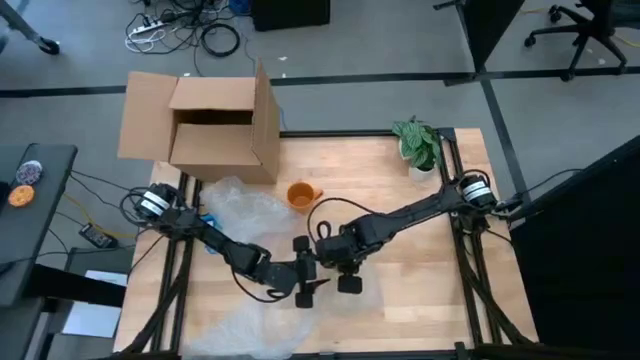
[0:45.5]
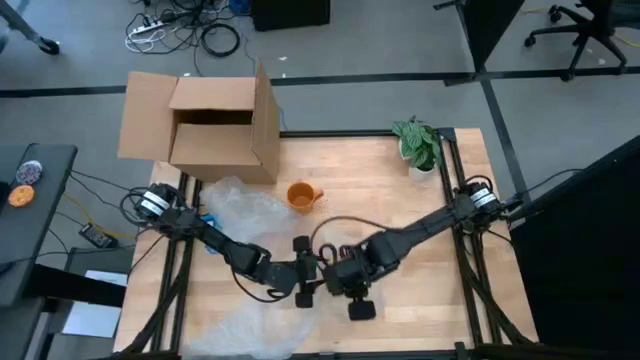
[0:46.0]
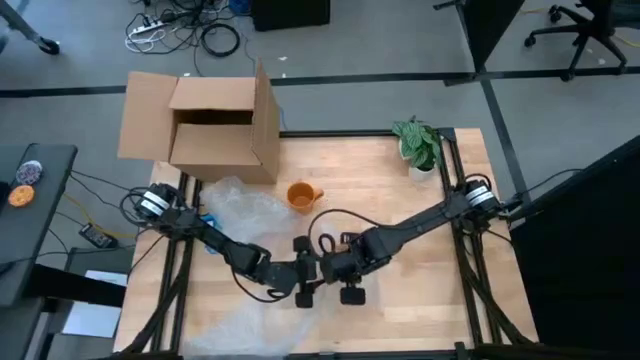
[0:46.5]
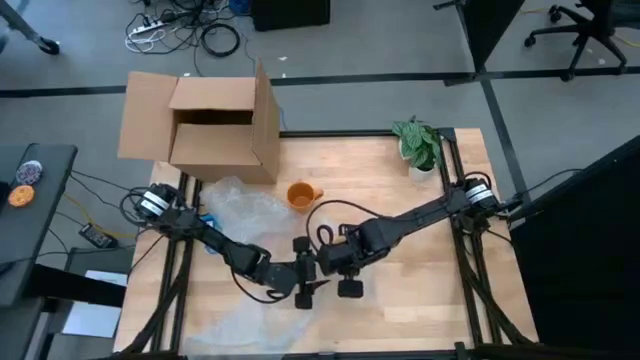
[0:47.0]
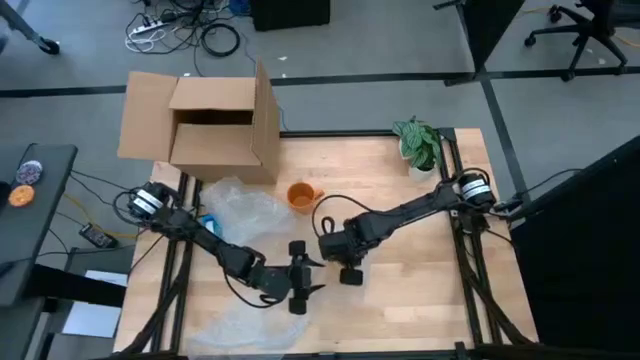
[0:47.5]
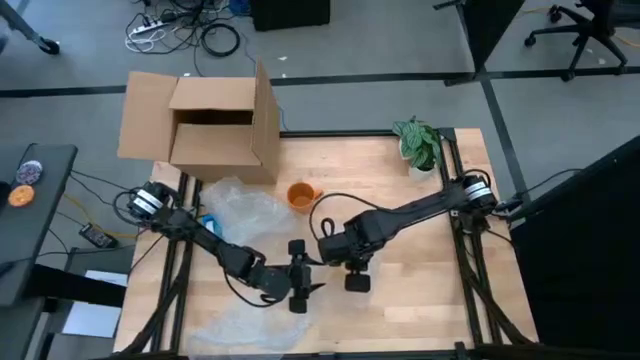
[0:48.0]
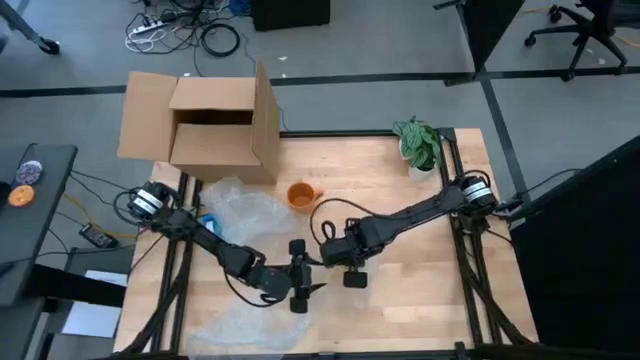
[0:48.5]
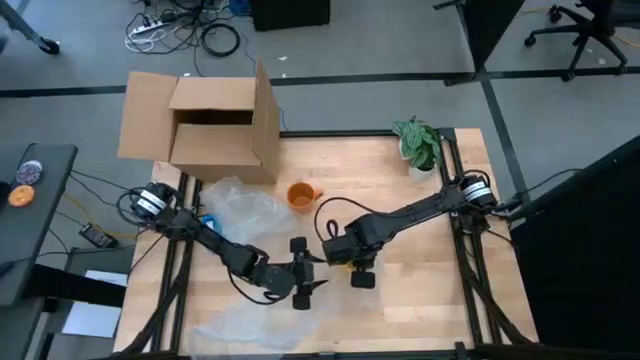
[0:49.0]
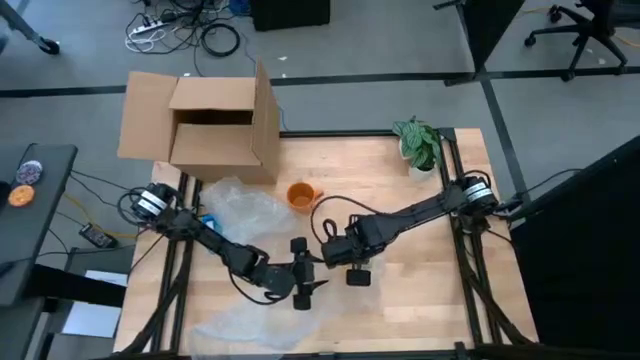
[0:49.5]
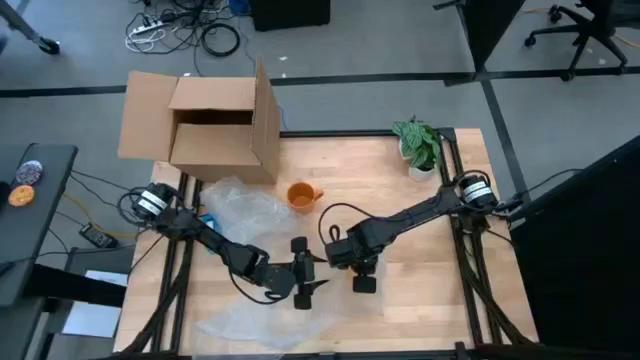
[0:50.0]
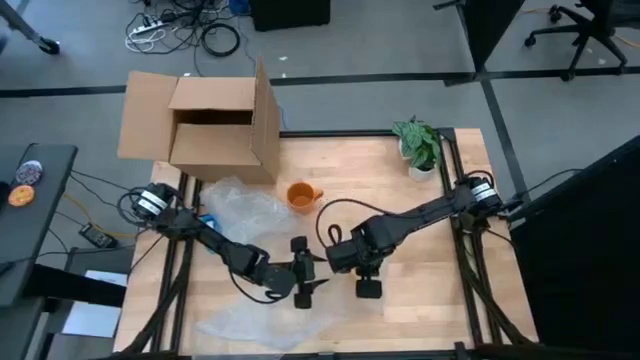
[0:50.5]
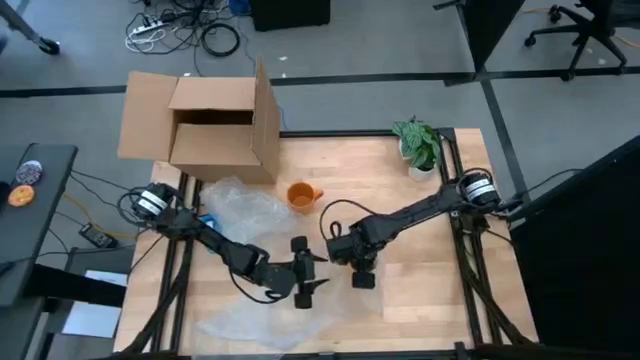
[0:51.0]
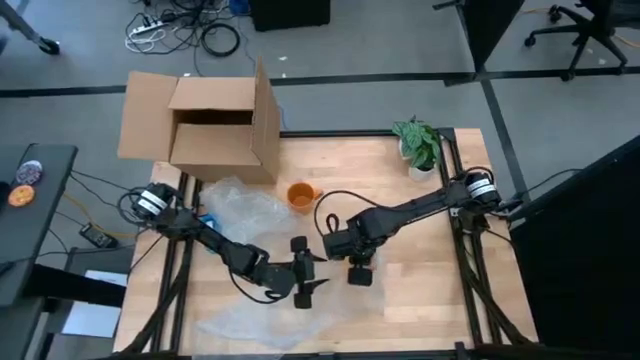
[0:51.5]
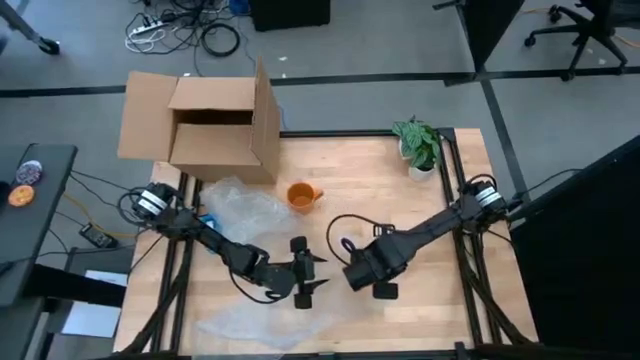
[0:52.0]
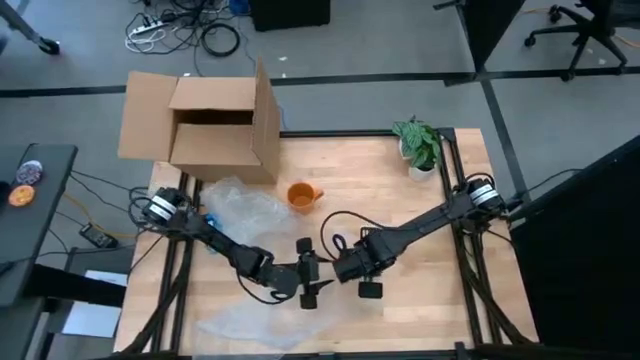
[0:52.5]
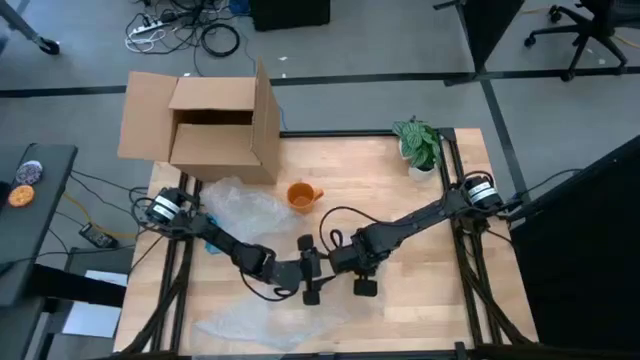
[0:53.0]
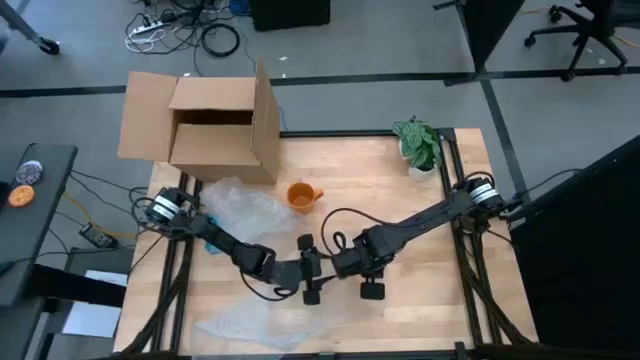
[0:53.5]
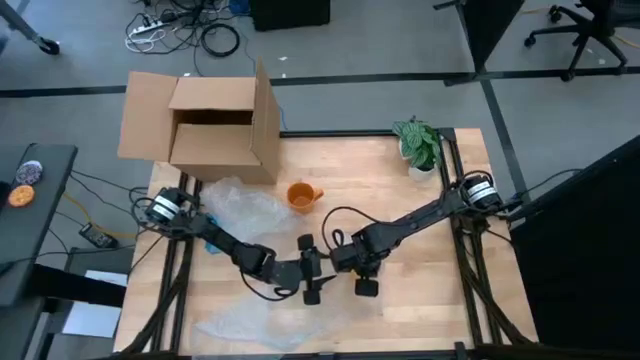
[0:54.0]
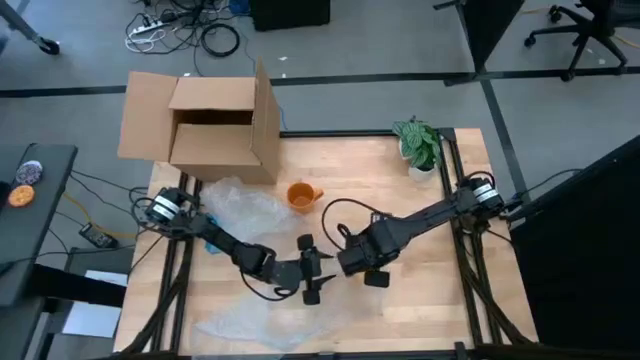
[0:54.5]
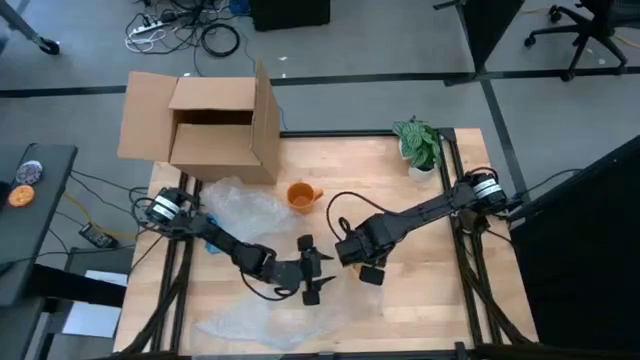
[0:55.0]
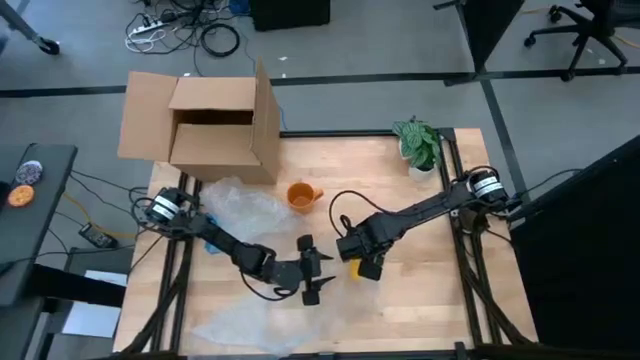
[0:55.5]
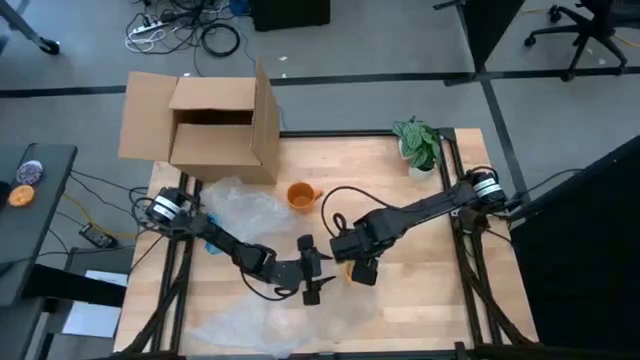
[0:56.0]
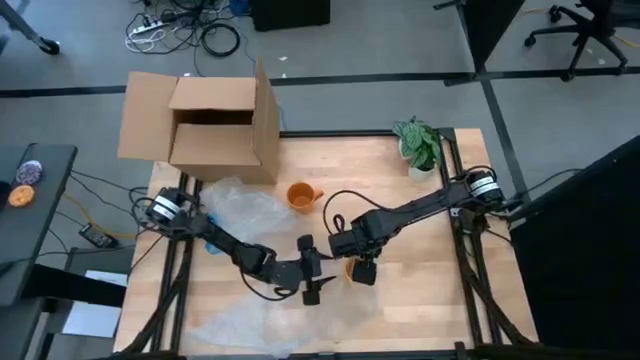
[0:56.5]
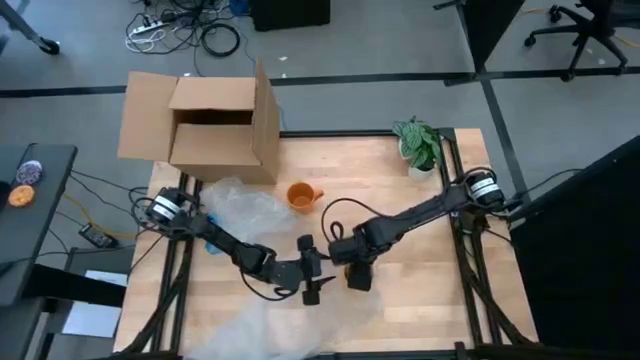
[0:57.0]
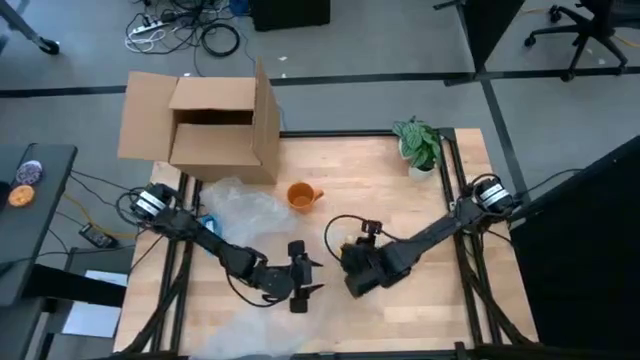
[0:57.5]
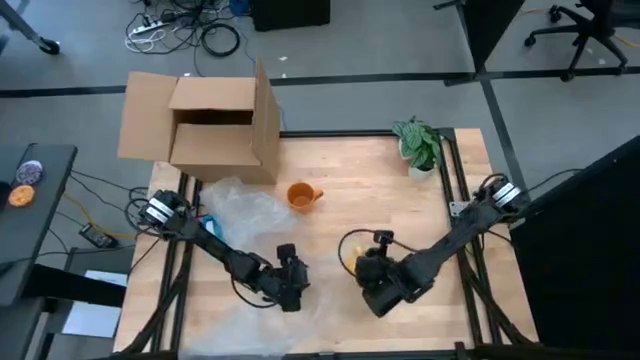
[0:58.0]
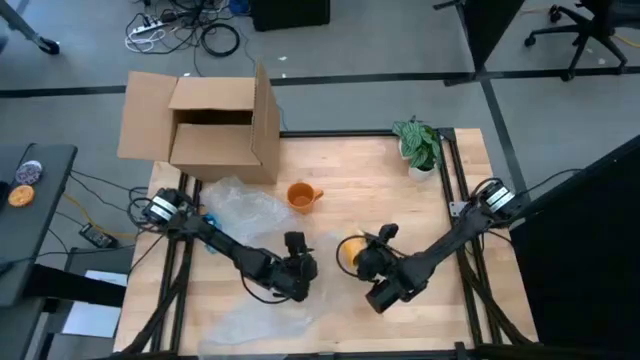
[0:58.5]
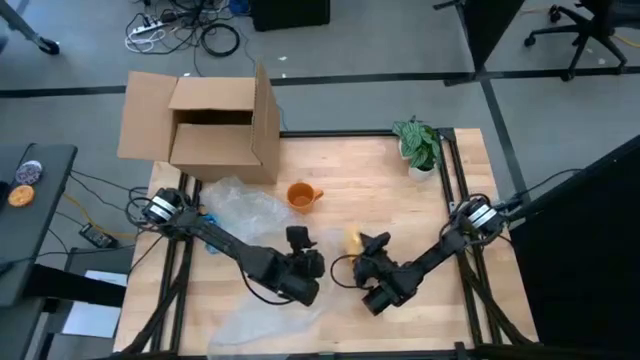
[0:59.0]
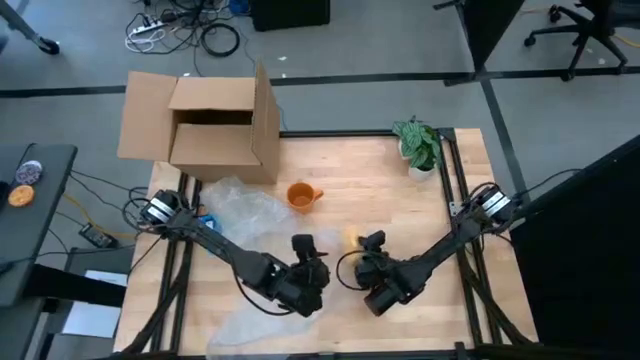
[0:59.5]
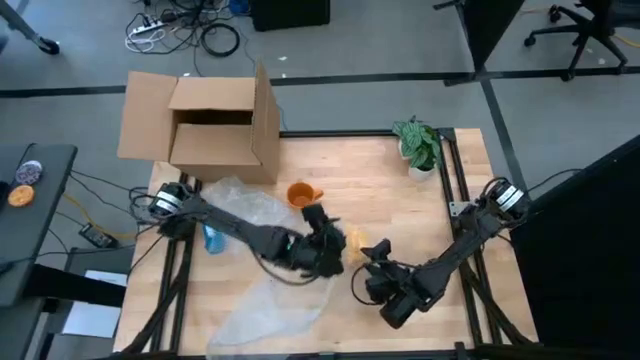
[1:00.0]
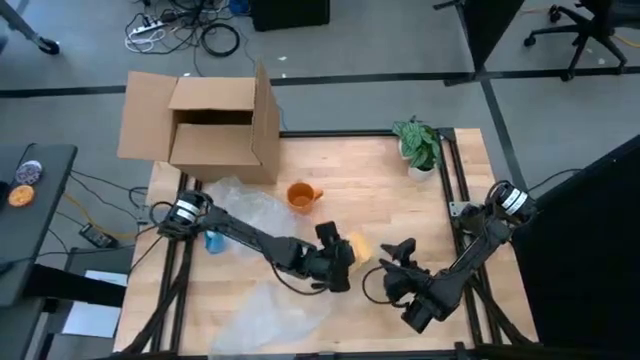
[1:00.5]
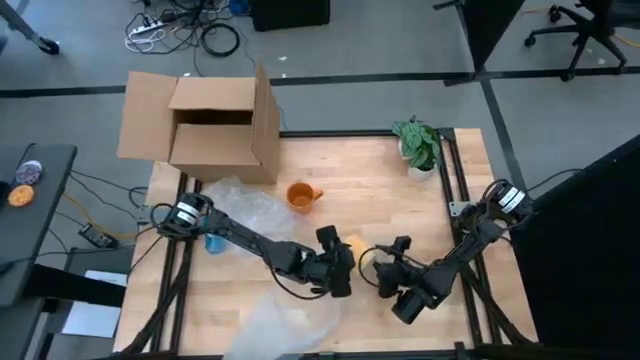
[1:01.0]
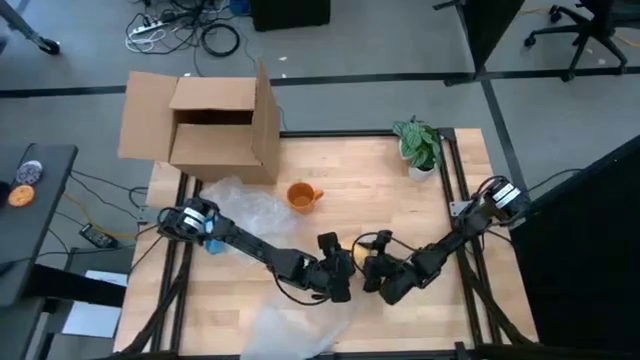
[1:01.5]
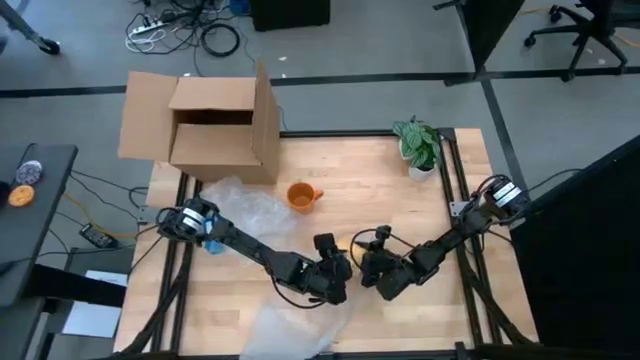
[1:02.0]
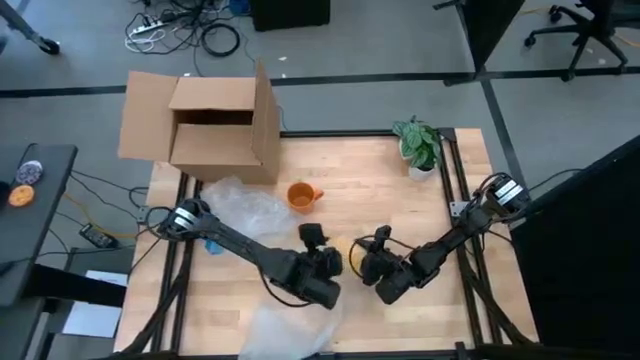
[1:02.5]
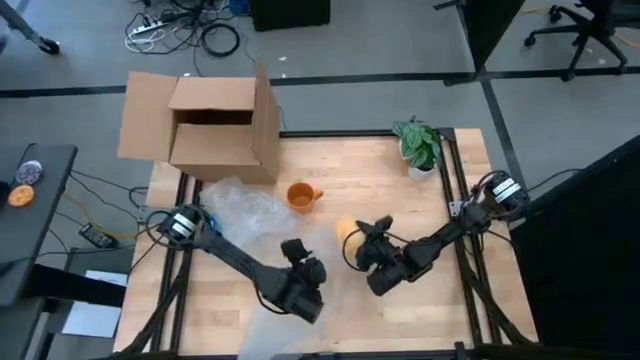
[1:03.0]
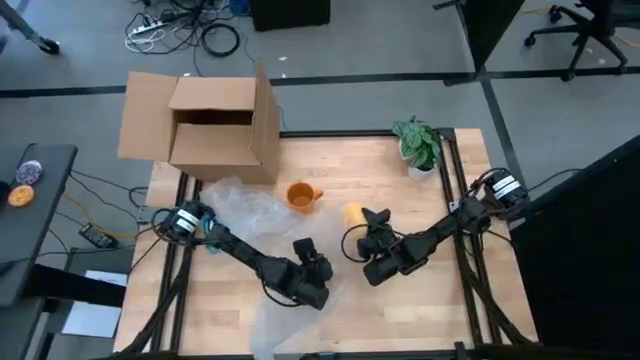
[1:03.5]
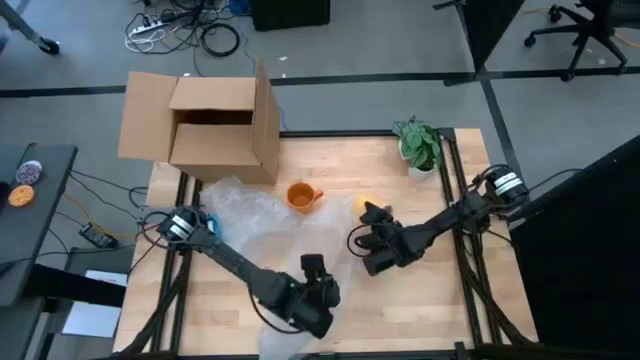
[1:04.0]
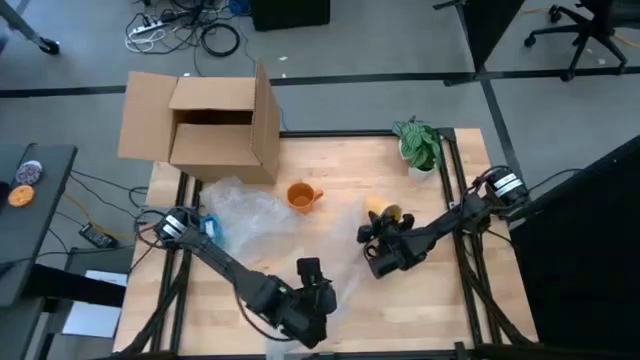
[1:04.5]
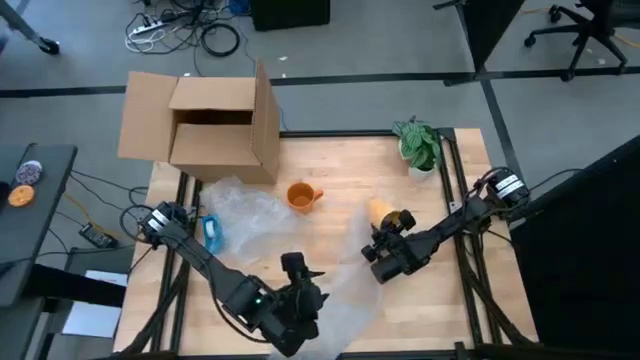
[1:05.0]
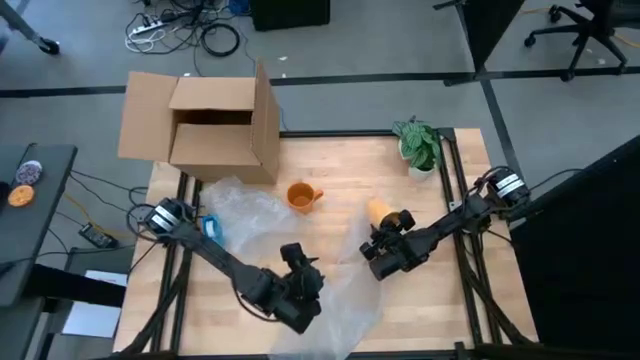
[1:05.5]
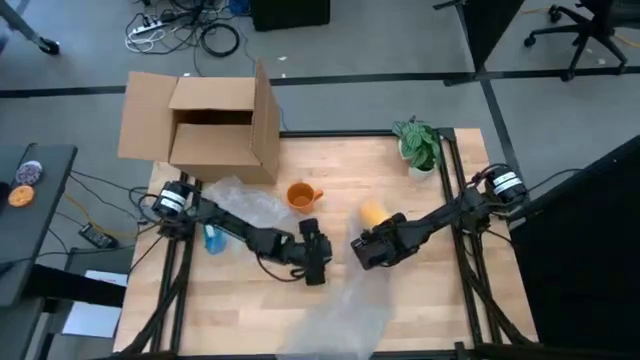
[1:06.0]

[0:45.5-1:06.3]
Task: wrap mug
Wrap the yellow mug using the transparent bubble wrap
